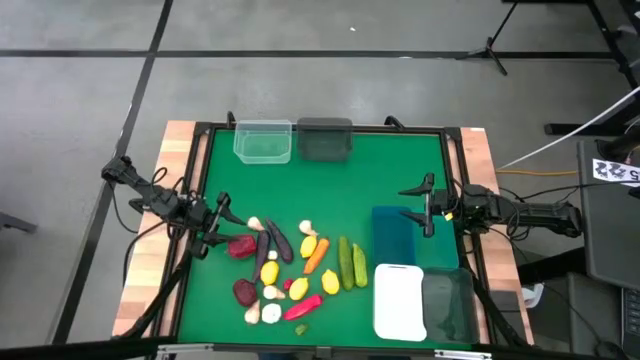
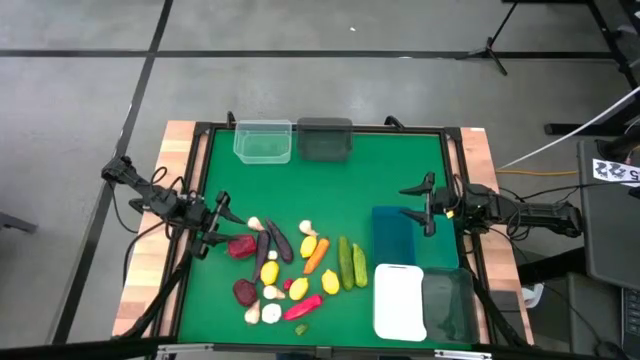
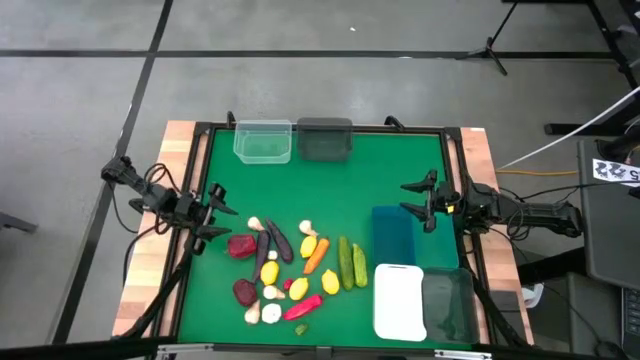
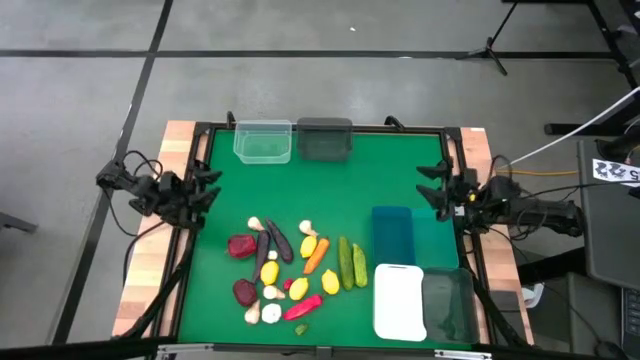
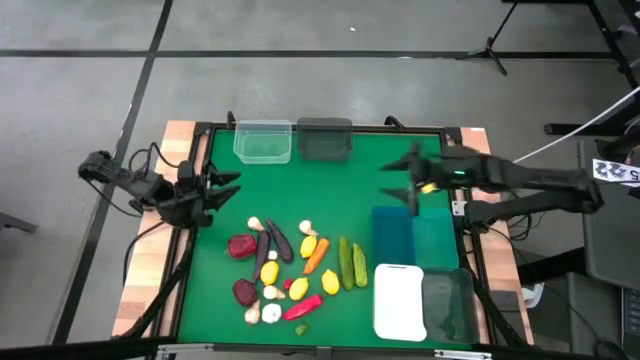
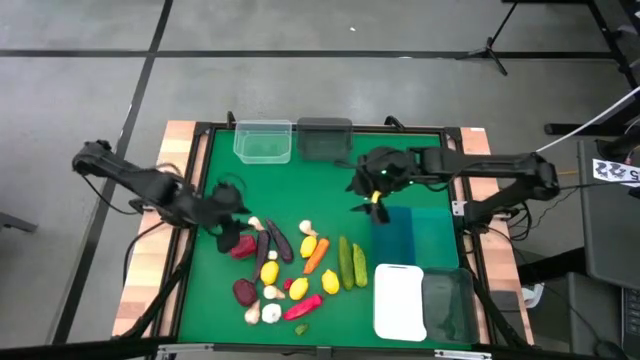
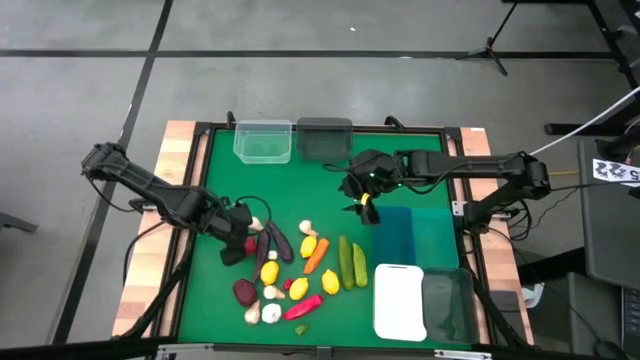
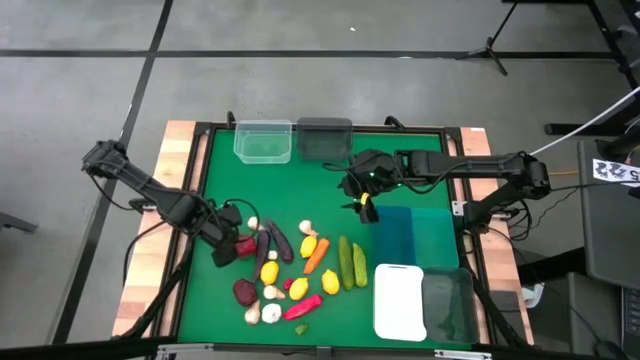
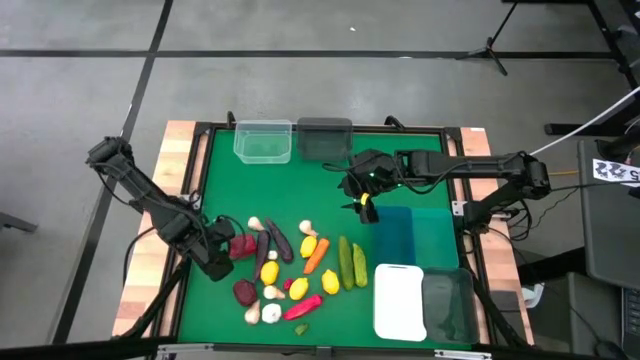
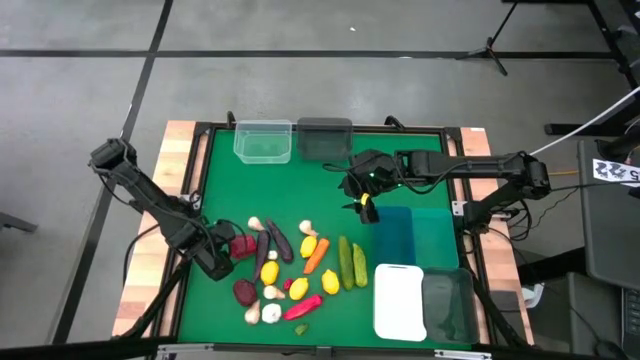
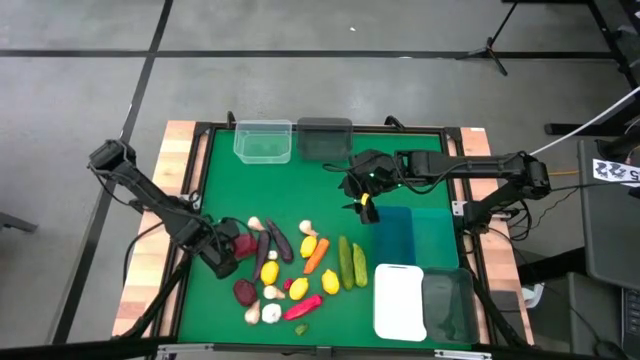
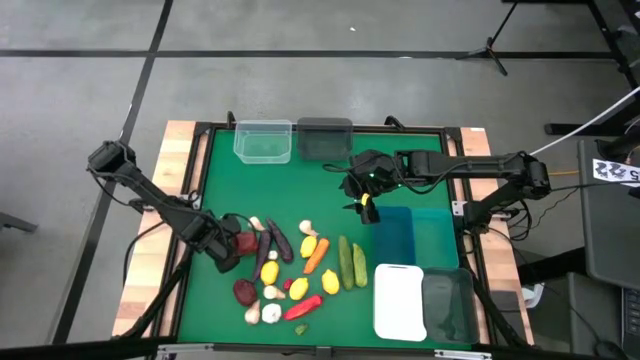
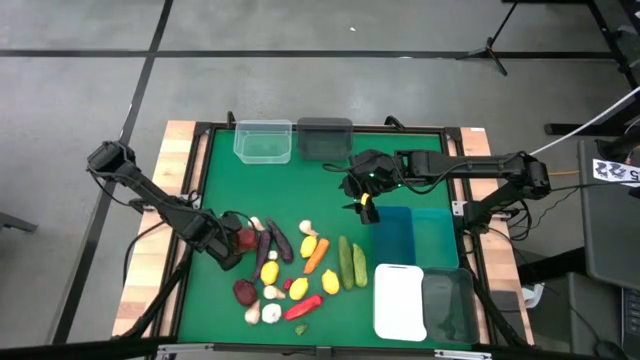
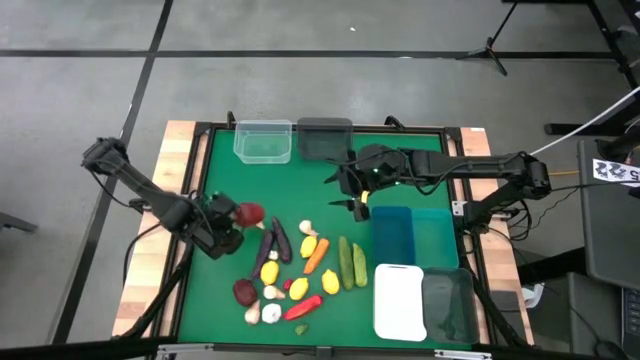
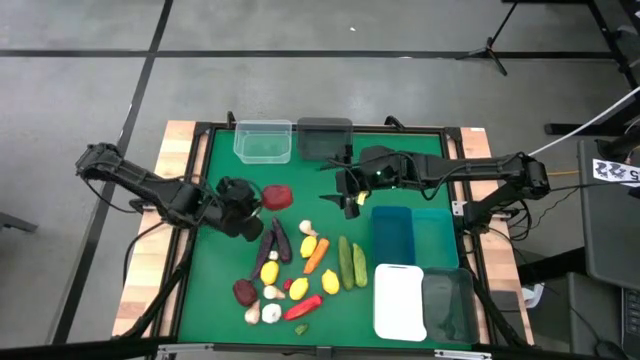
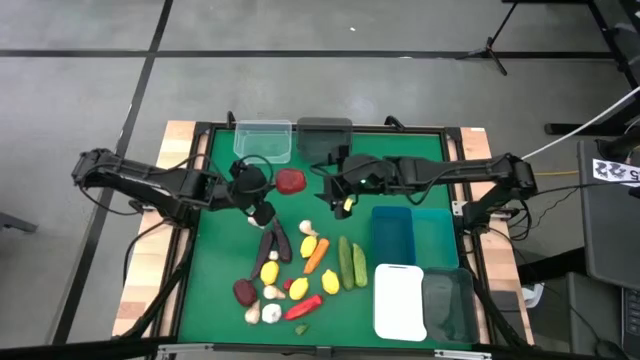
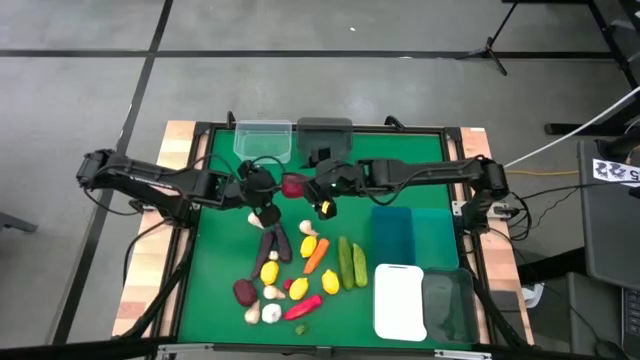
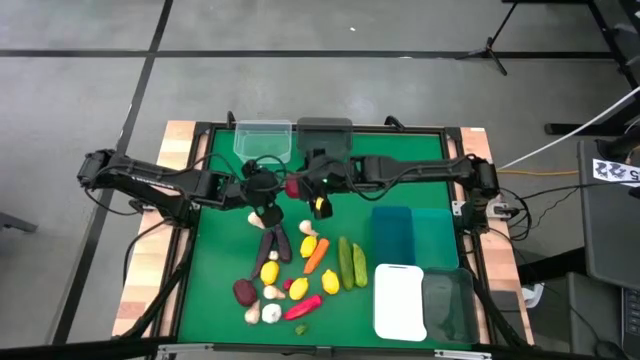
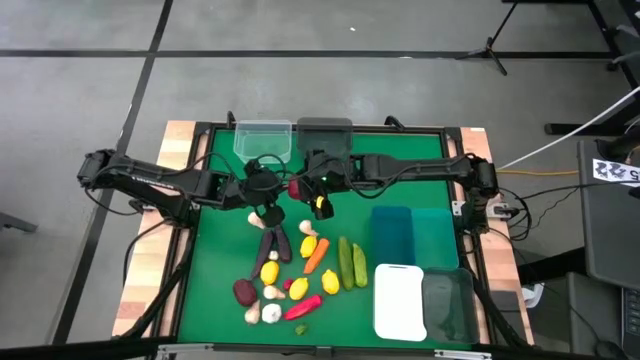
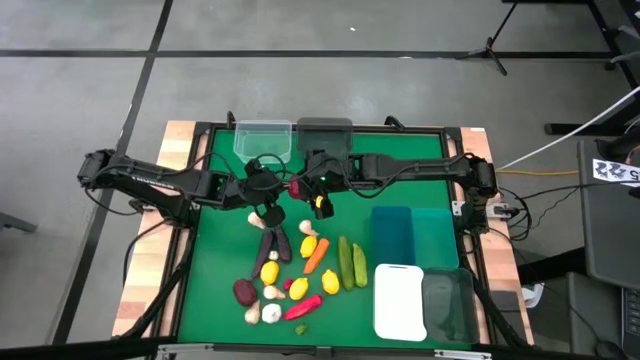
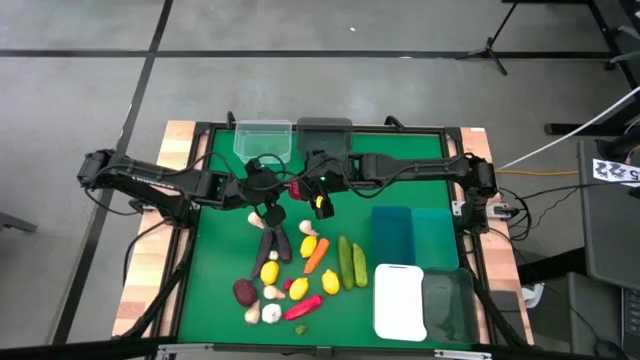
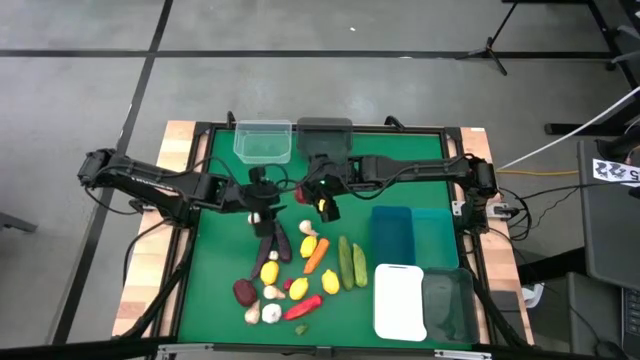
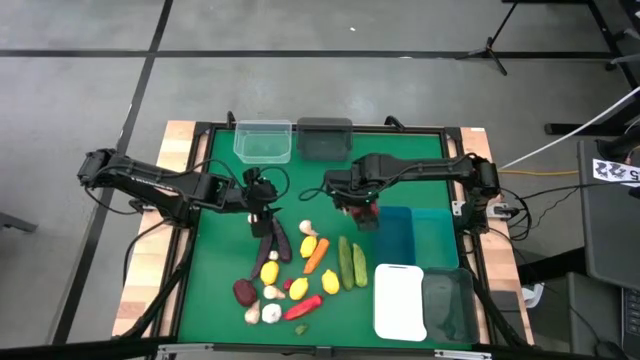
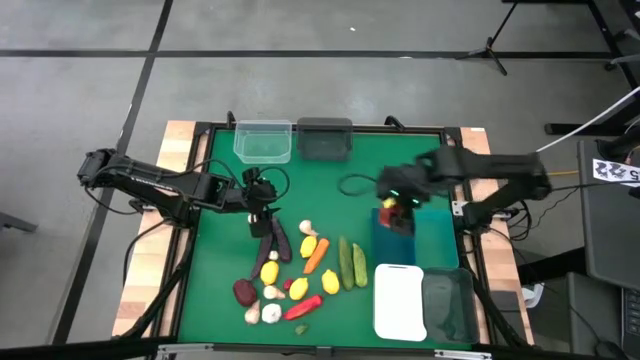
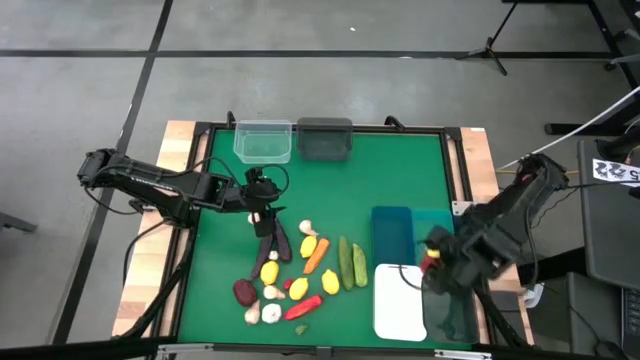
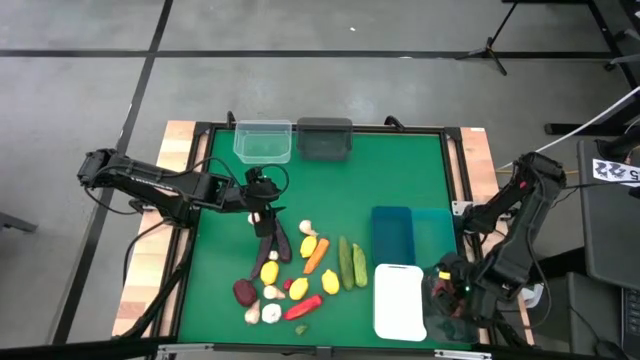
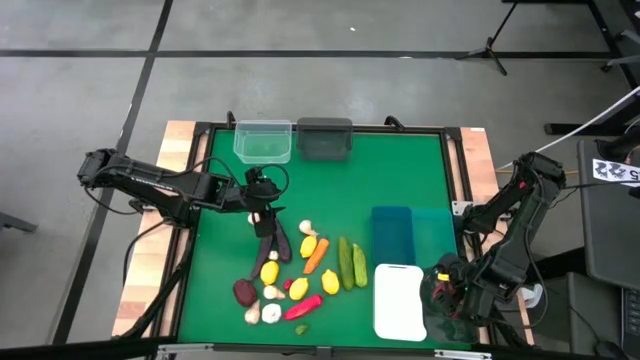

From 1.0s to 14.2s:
Task: Sort produce into baskets
Put the red apple into the bottom black bin
